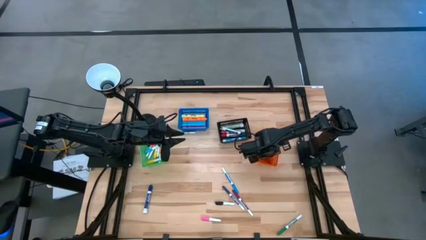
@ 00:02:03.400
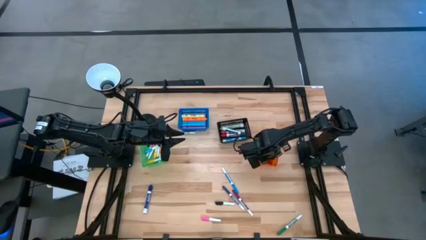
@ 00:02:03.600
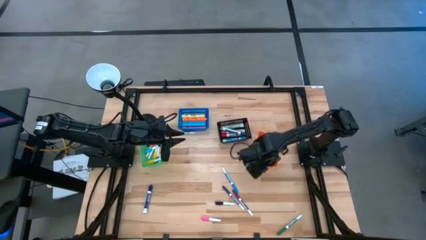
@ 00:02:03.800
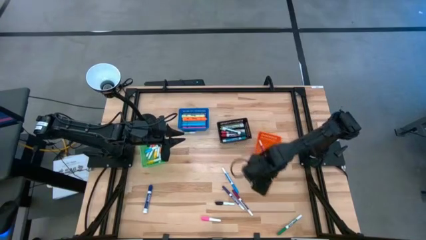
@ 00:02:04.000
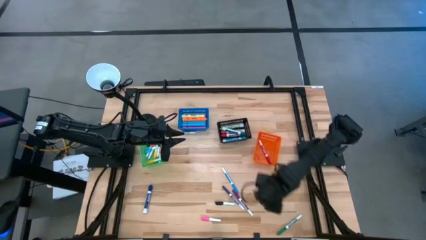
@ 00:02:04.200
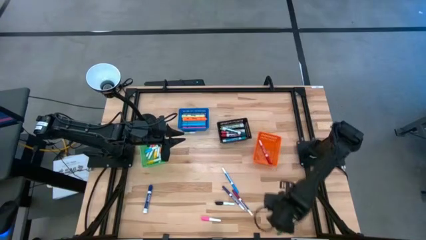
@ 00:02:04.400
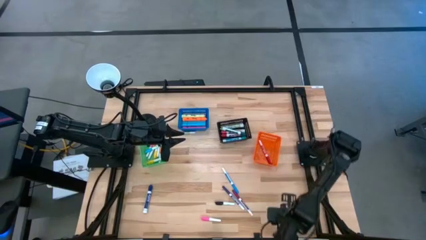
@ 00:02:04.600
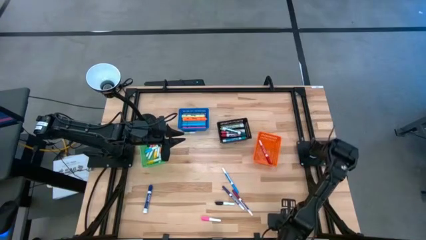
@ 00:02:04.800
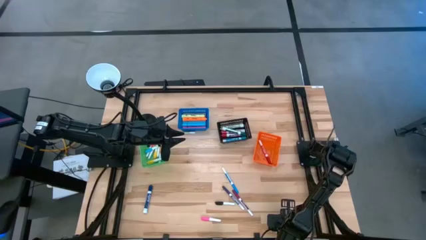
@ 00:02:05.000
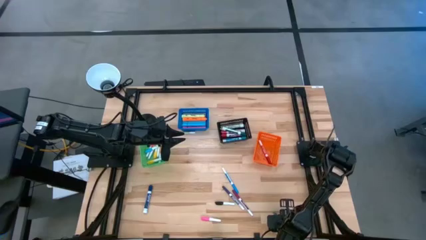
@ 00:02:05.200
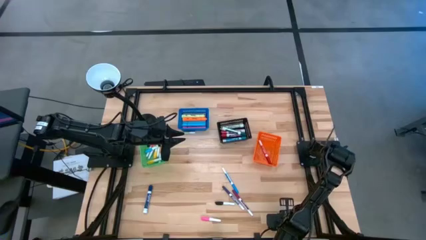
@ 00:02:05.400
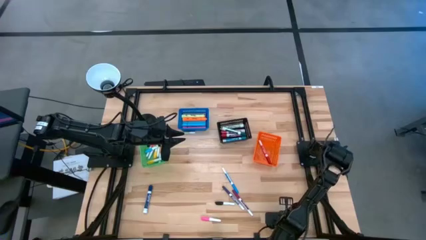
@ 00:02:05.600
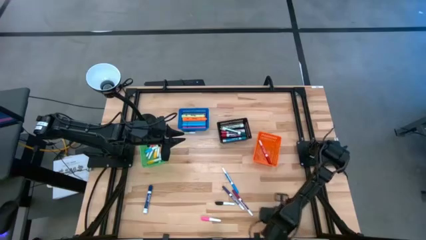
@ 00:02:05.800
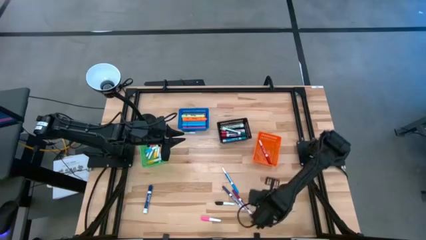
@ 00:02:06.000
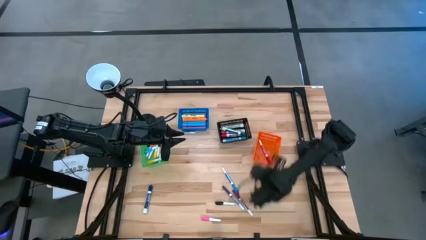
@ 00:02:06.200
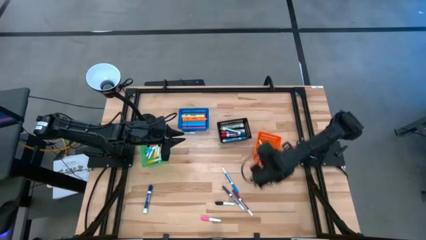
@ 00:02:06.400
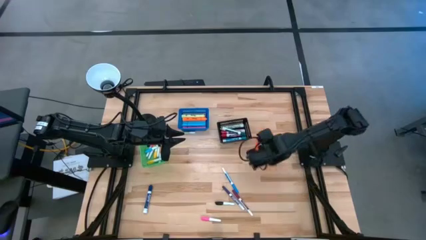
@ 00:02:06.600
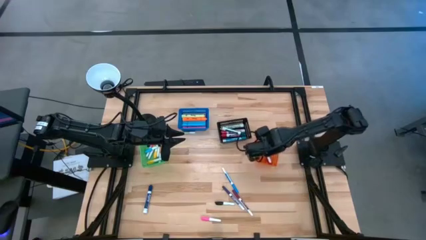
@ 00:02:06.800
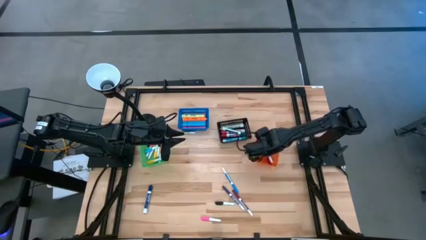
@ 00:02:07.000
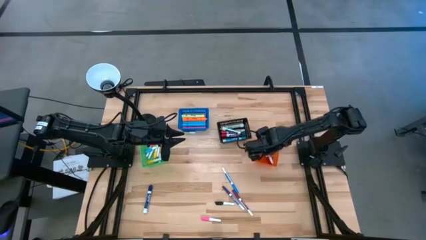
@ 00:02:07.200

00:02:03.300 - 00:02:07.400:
Task: Pick & Place Markers
Put the dark green marker pen into the orange basket

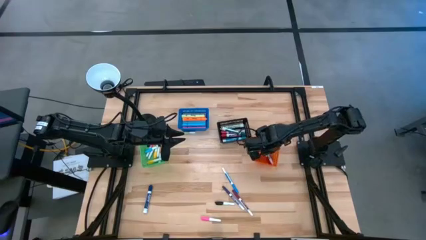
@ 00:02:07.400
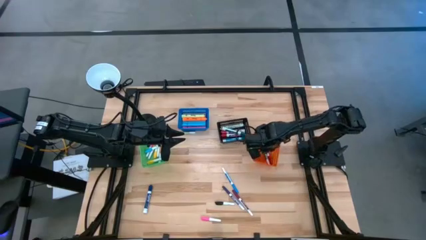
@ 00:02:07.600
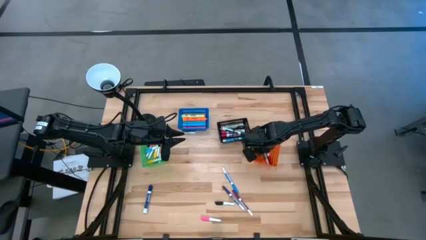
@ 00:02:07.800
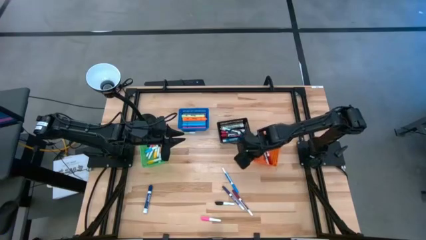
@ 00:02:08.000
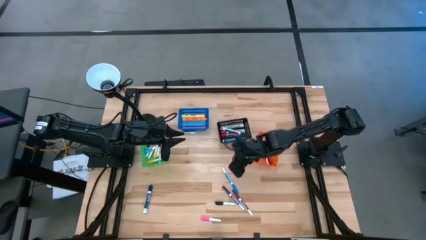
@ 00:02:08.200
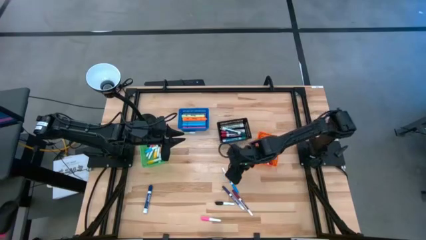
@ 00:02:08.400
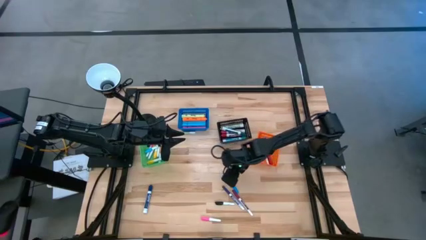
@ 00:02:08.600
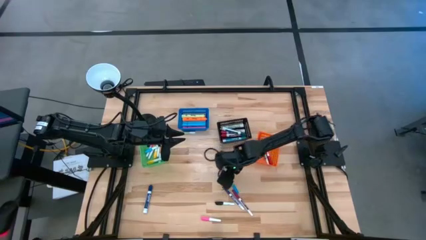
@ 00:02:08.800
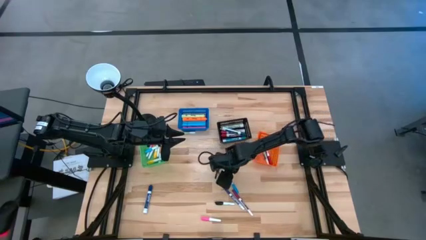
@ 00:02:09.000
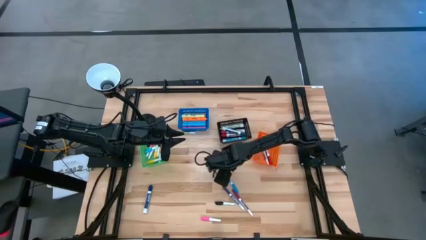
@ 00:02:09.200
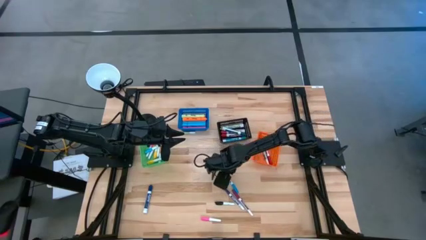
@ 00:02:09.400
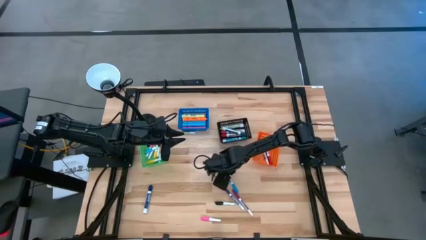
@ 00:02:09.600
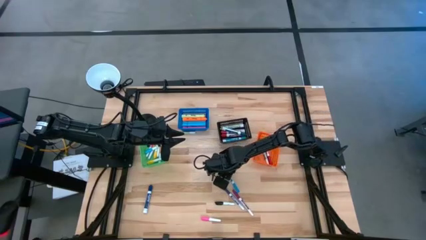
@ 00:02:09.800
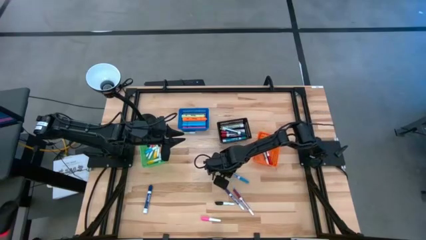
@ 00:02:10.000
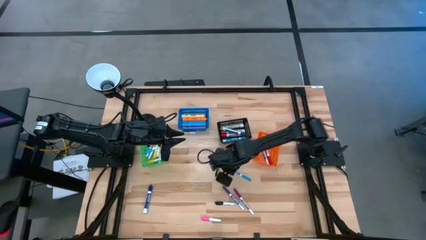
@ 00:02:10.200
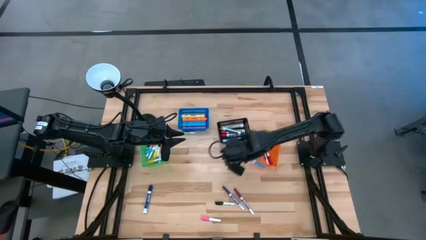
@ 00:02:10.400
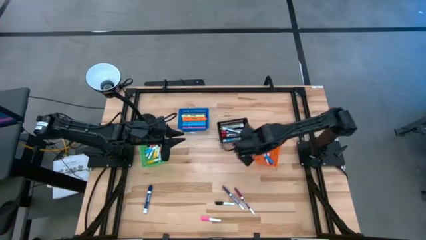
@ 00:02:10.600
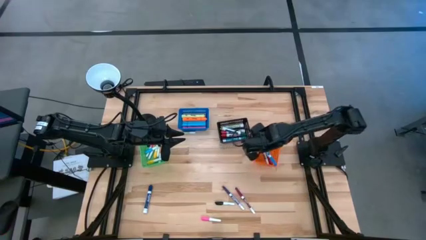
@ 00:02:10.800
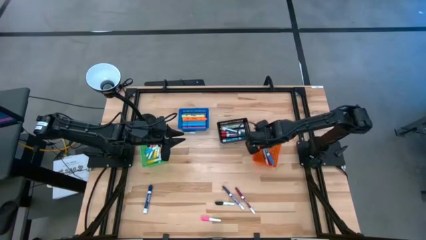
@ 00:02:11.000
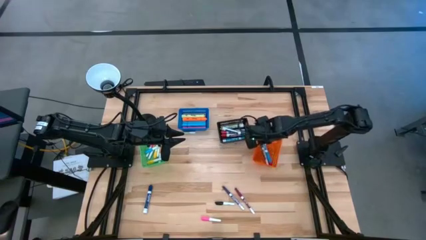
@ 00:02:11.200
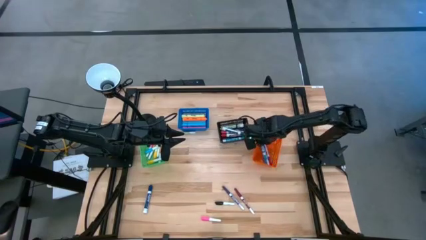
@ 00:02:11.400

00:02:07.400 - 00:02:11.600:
Put the light blue marker pen into the orange basket

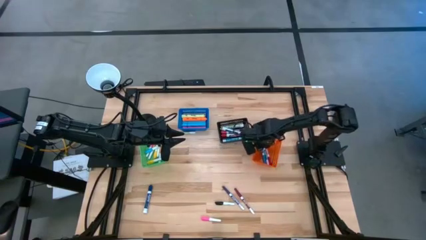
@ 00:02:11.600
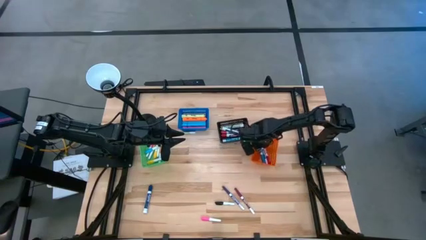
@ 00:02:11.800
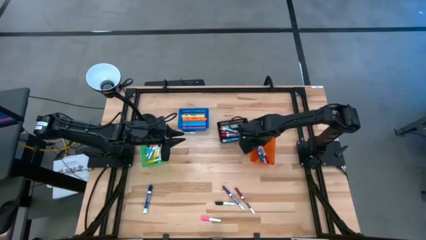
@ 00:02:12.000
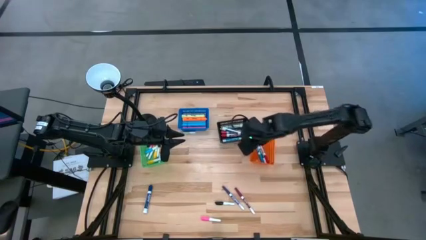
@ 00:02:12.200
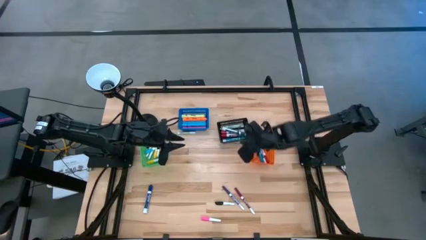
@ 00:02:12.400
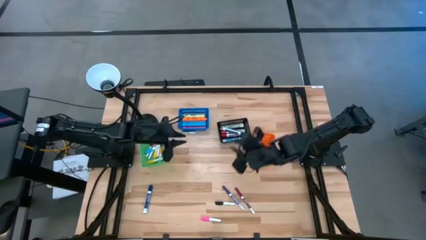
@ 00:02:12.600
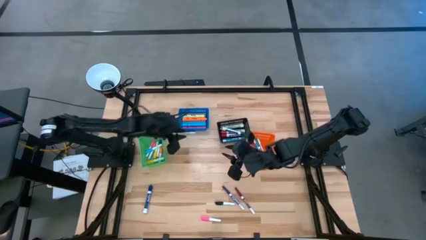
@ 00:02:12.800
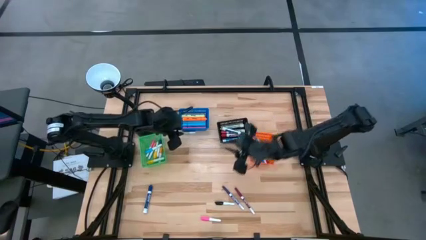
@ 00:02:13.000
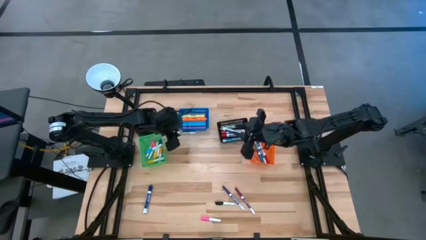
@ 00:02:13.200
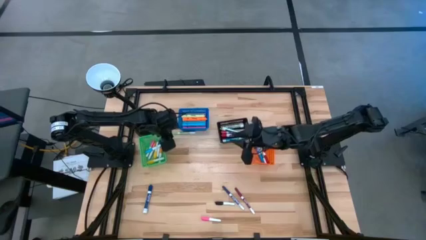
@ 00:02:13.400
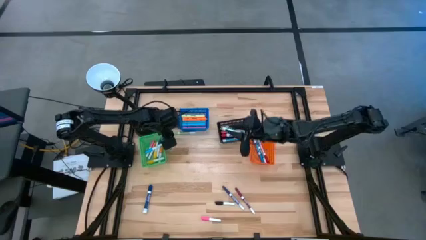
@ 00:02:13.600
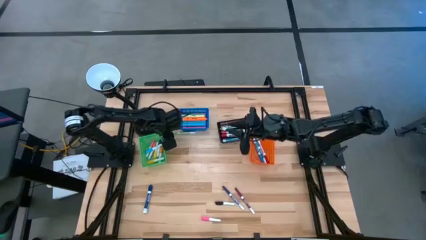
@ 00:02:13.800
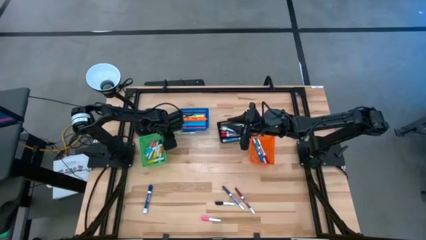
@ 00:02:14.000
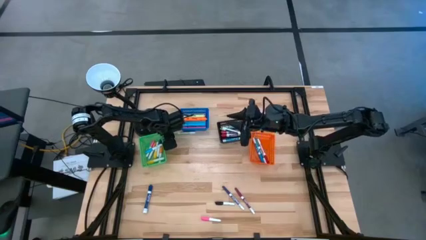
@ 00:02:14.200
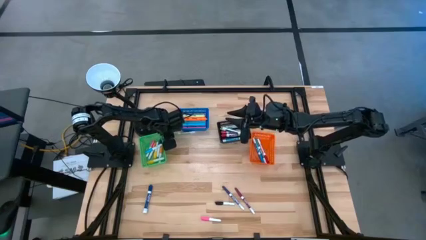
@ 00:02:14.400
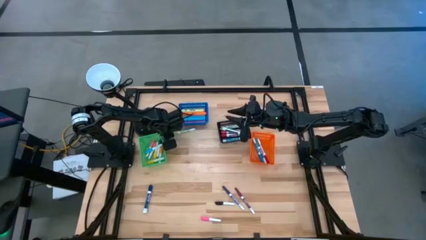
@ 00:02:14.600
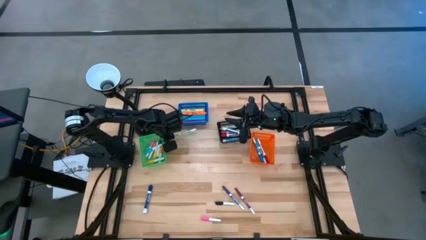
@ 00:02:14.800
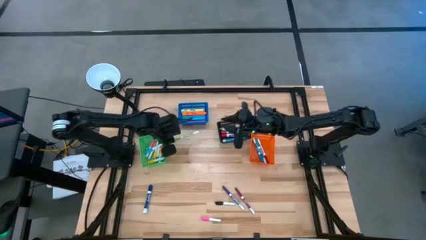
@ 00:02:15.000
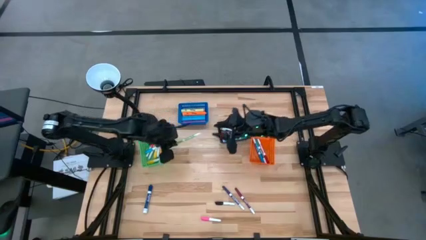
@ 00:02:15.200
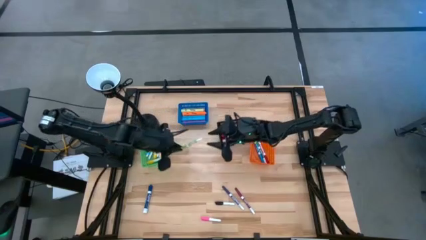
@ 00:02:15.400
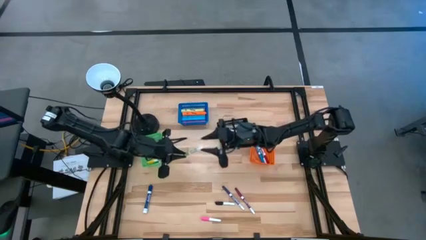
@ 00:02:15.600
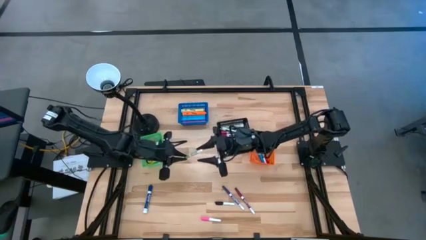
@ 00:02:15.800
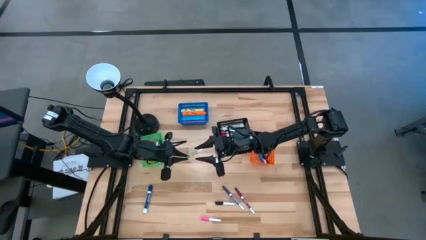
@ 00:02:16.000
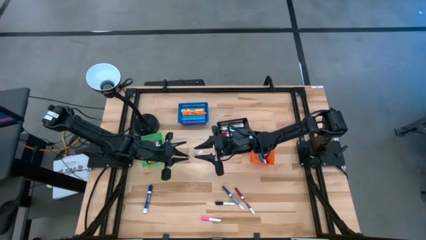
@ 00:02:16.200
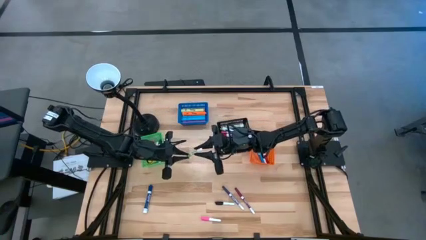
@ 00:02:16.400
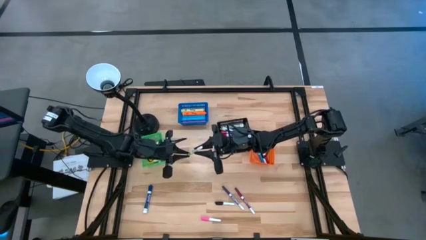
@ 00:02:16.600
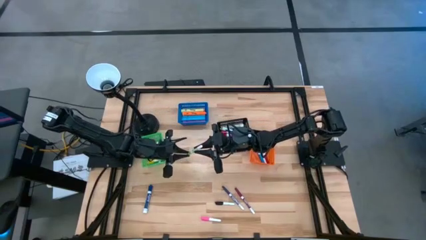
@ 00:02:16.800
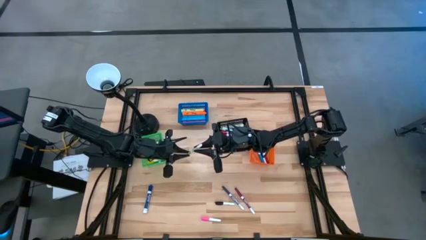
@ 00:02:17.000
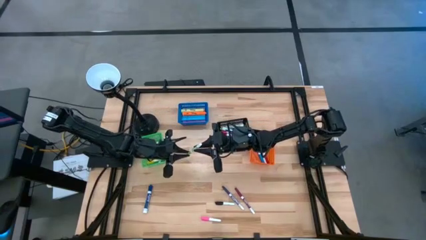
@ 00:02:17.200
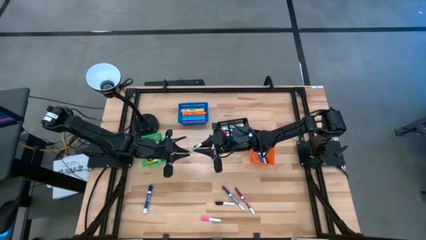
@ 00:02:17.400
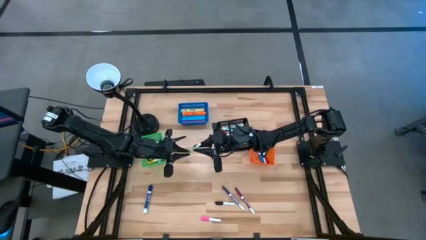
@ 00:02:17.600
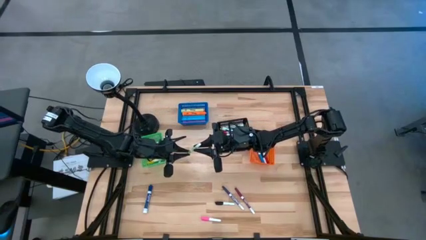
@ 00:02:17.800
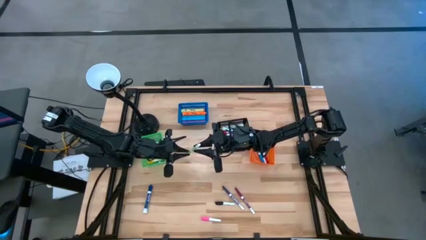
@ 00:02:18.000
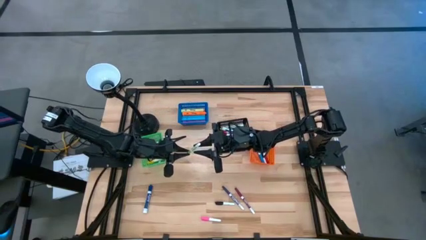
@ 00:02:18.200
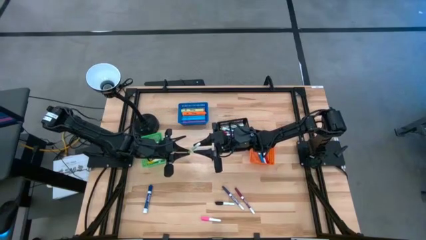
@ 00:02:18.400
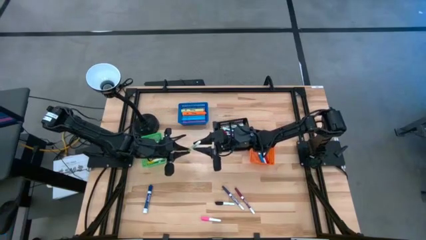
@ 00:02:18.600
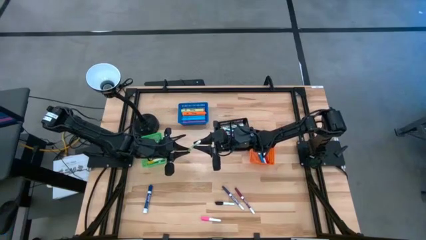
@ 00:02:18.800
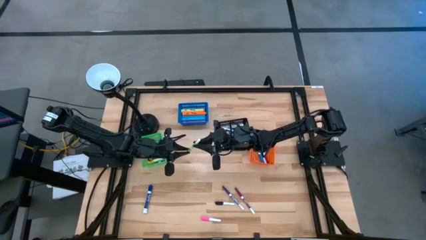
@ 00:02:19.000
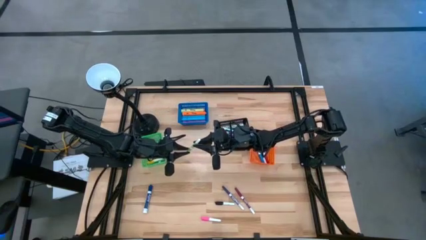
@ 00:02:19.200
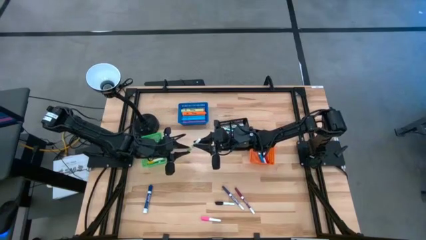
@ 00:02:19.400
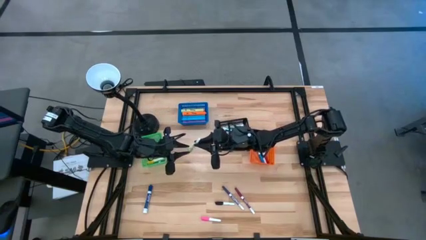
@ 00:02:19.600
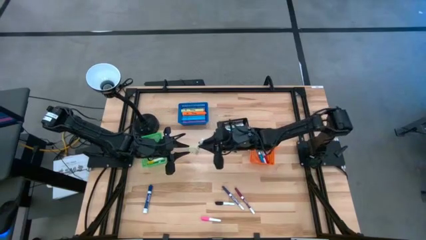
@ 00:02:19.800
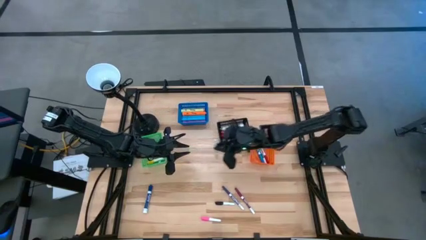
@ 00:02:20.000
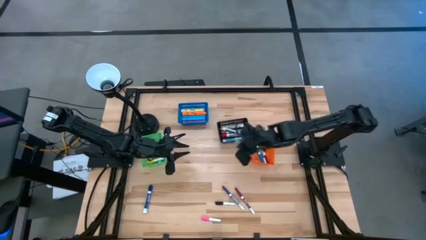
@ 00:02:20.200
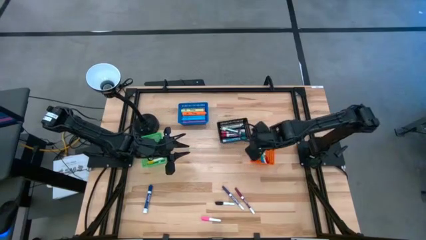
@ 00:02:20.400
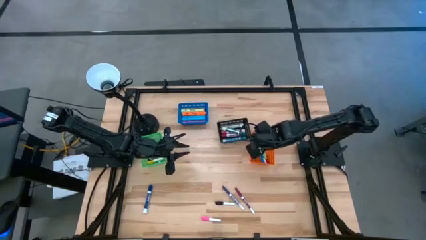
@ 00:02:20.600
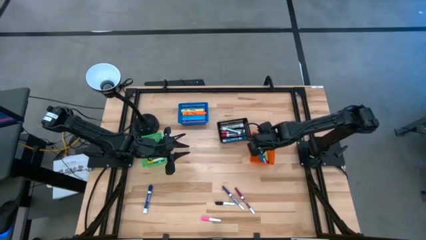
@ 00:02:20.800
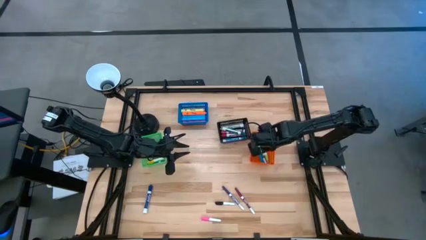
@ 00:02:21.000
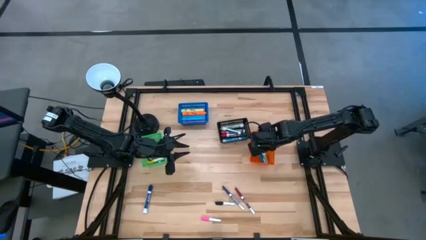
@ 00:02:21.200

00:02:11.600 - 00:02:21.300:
Put the light green marker pen into the orange basket
